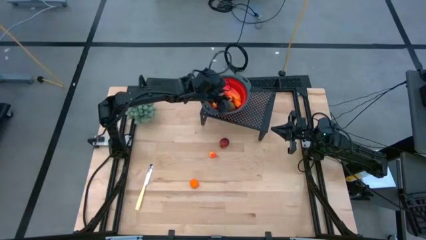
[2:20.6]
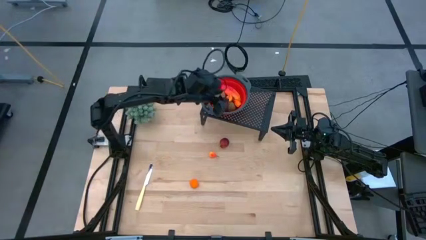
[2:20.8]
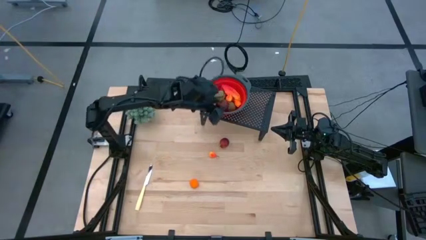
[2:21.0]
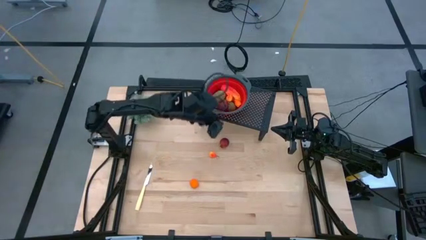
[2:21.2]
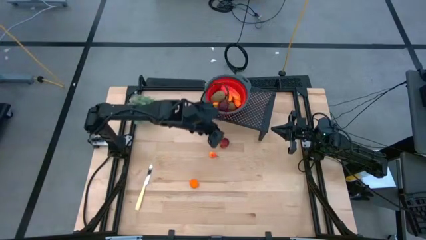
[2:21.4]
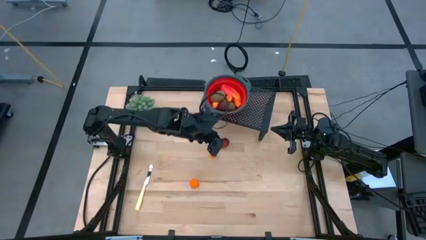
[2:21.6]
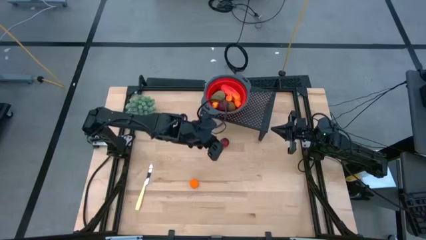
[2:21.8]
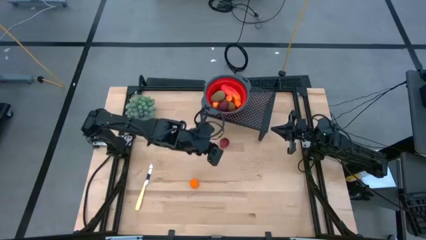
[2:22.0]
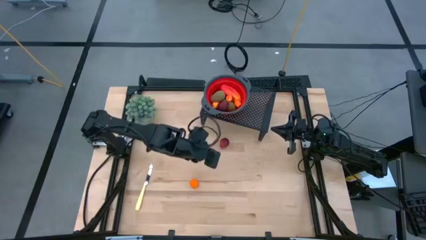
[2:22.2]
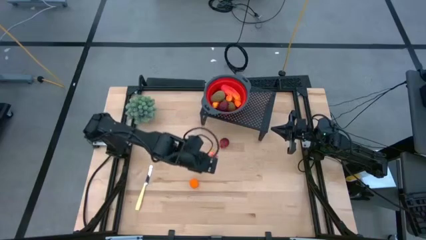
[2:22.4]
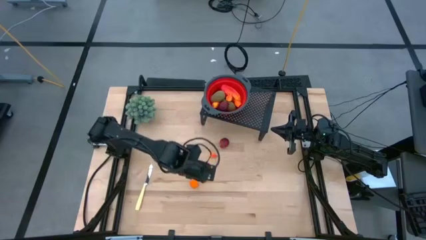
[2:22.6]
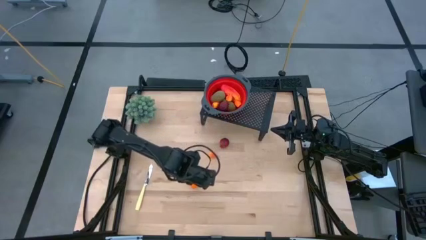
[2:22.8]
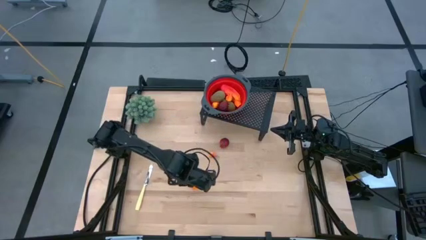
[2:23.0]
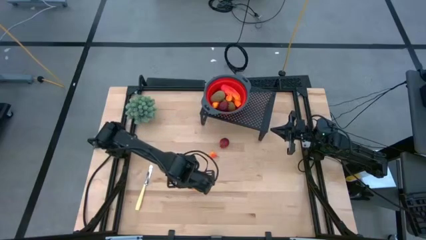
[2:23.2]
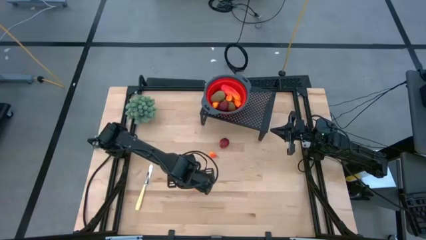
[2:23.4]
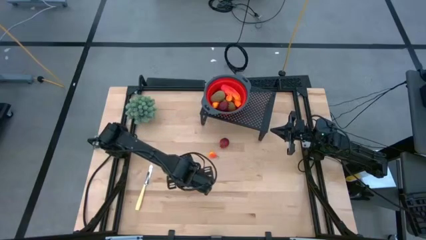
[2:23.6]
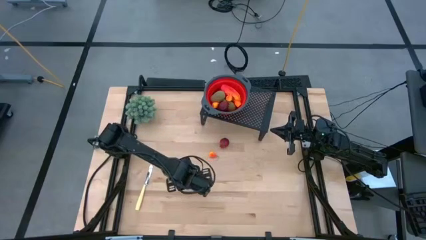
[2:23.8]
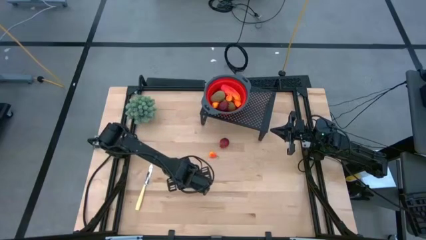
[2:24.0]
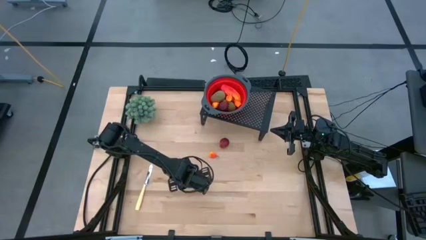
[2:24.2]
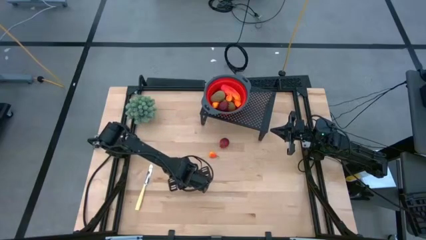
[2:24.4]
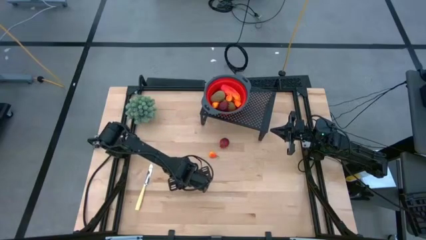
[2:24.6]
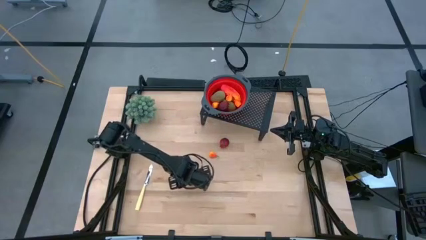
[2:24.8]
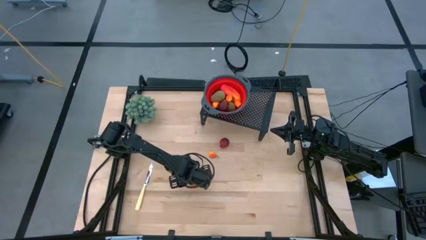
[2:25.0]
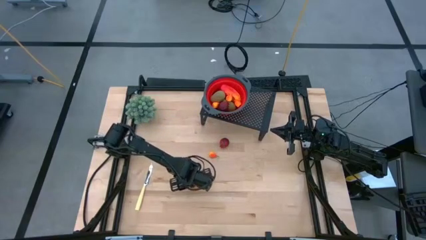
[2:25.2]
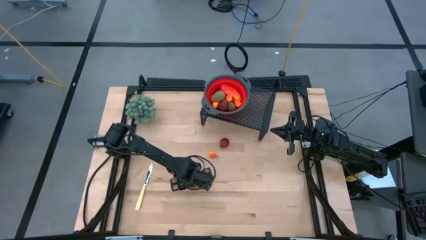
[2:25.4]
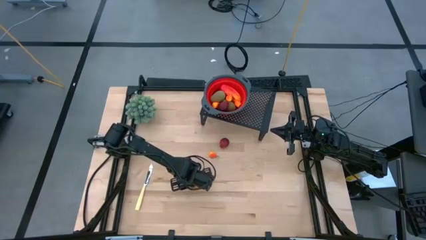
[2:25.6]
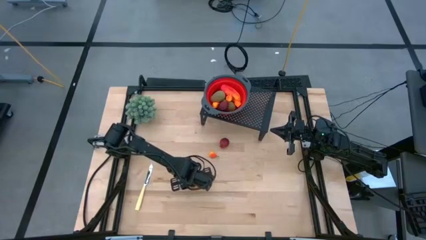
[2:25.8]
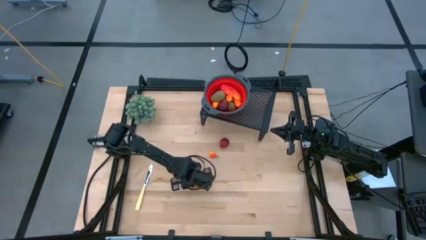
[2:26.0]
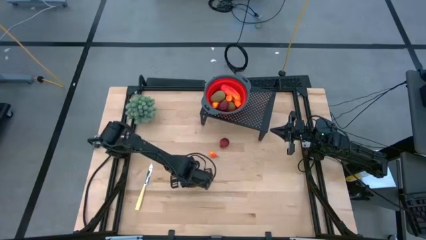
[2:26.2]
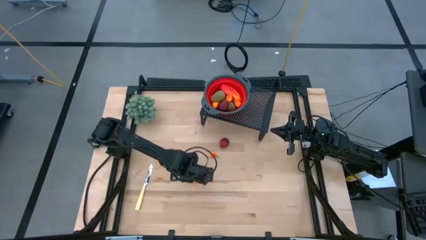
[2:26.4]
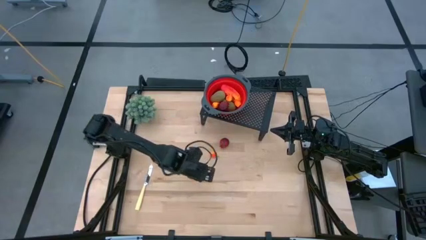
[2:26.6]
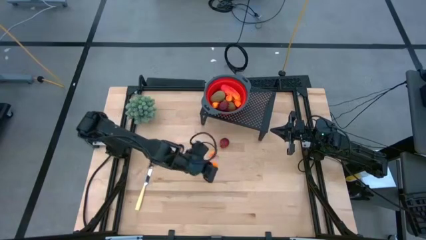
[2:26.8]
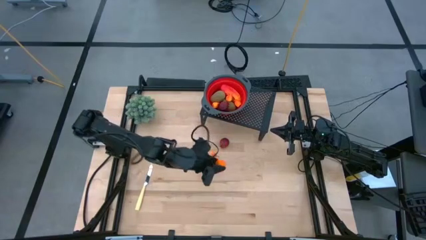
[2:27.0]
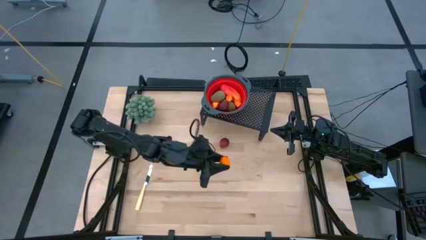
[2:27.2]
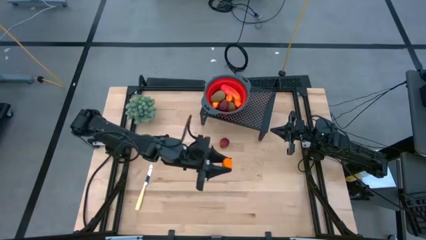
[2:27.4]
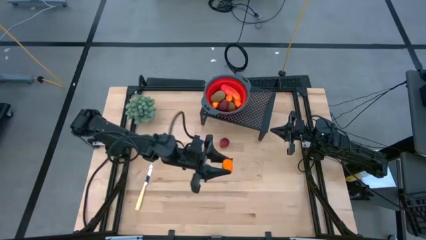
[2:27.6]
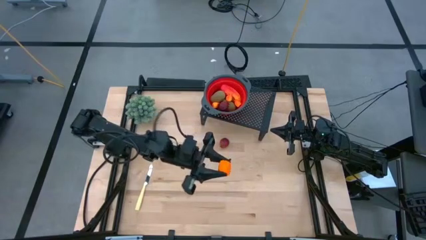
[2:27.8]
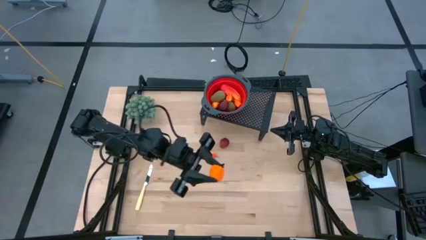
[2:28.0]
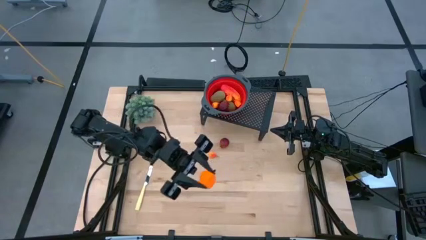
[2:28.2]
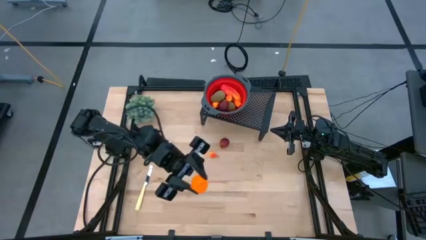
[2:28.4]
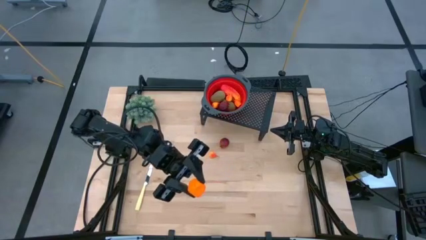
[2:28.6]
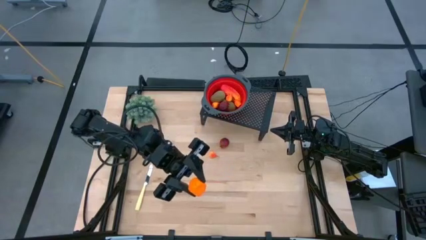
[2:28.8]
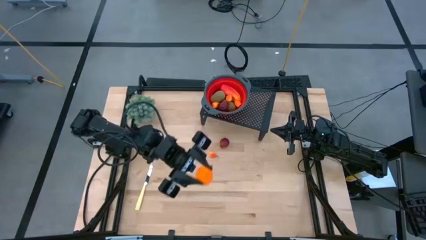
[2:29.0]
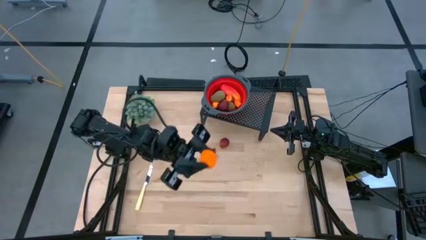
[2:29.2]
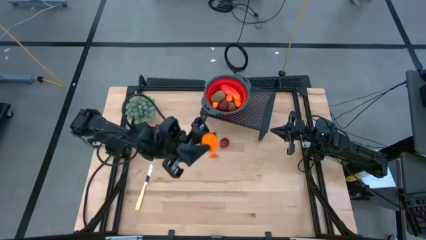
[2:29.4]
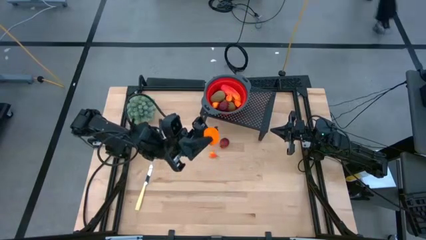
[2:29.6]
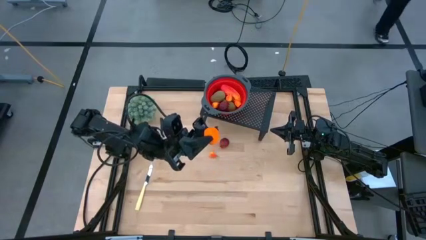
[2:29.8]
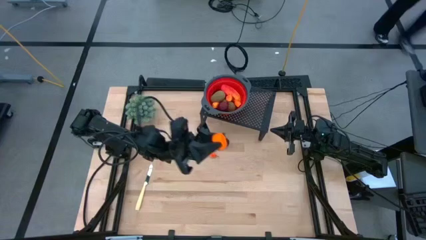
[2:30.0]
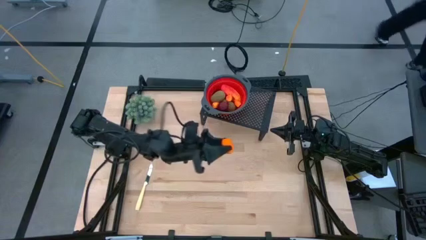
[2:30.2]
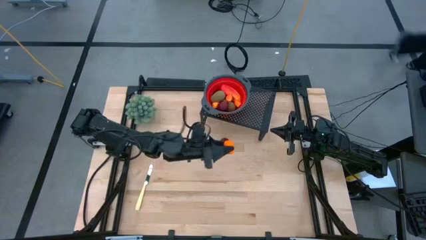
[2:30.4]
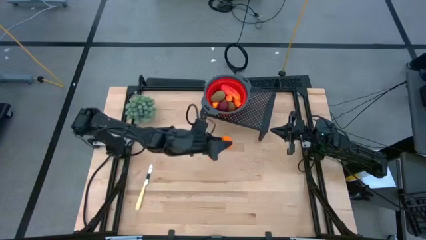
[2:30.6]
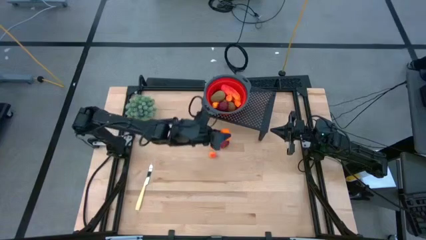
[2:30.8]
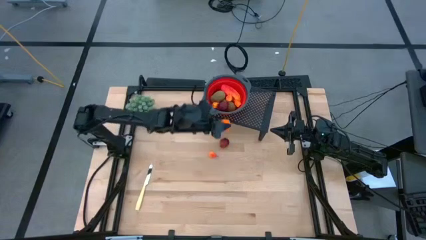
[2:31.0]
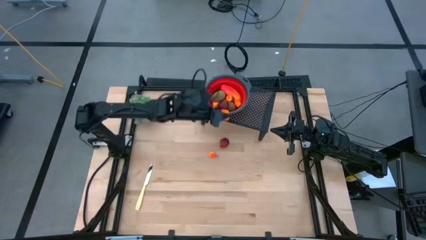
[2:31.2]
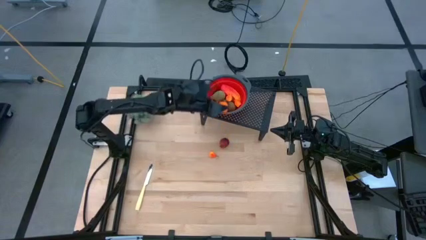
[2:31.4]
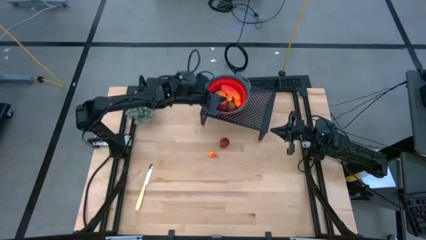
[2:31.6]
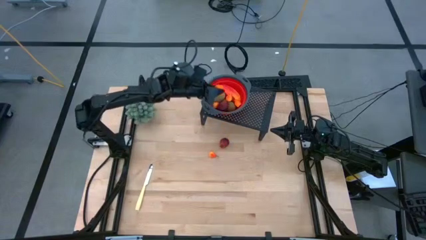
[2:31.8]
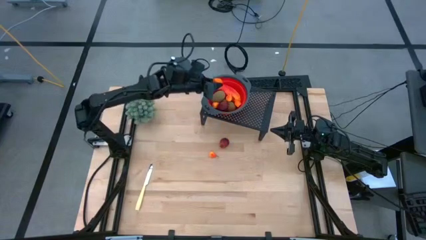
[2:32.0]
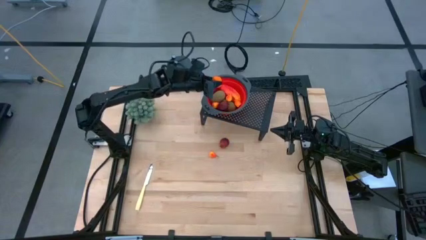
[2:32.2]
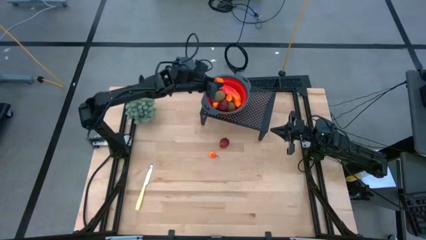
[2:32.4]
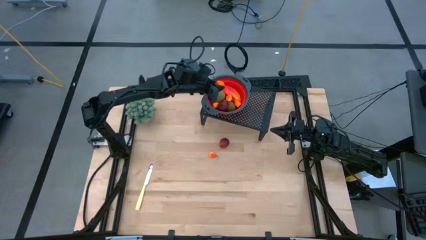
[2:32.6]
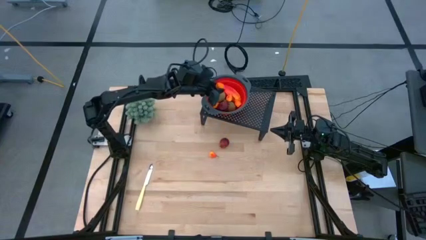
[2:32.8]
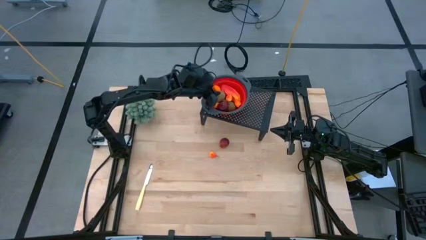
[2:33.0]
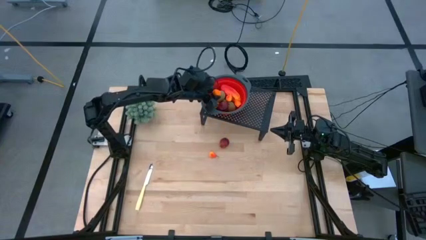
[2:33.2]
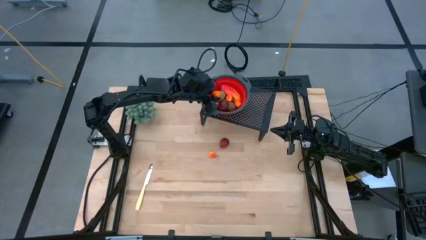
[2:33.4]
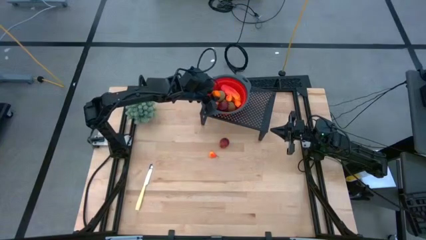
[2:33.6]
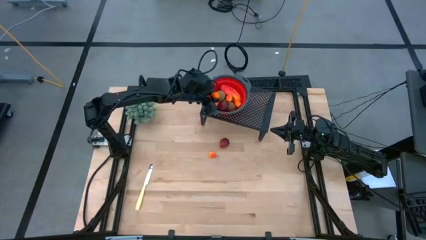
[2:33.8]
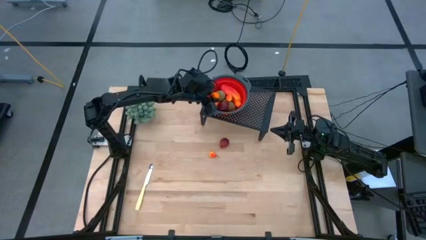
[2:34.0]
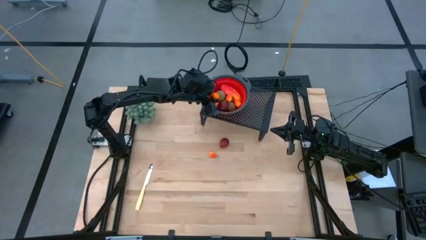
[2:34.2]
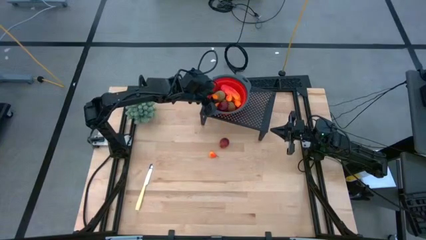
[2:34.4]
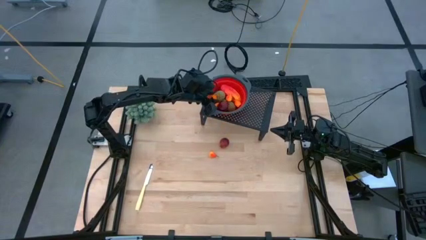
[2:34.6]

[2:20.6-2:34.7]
Task: Pick & Place Fruit
Put the orange into the red strainer bowl on the shelf
